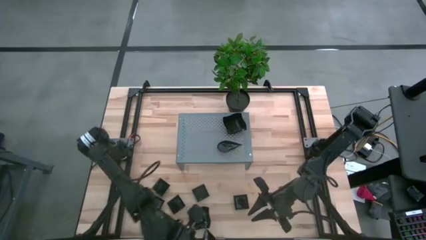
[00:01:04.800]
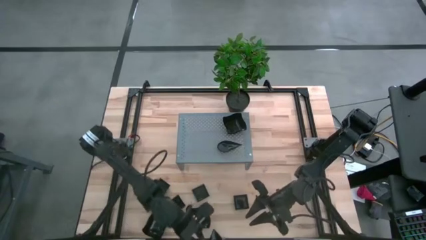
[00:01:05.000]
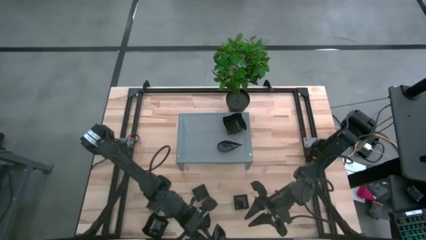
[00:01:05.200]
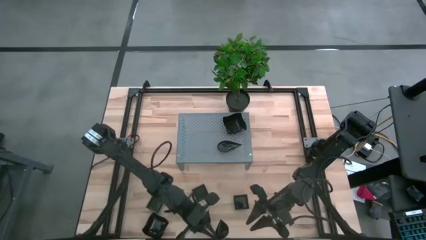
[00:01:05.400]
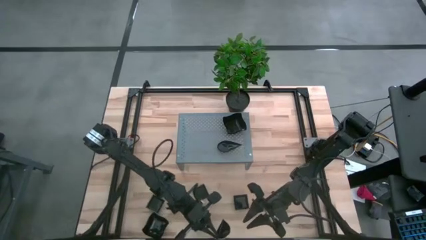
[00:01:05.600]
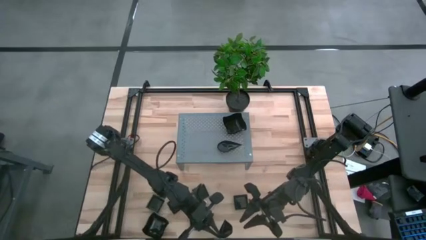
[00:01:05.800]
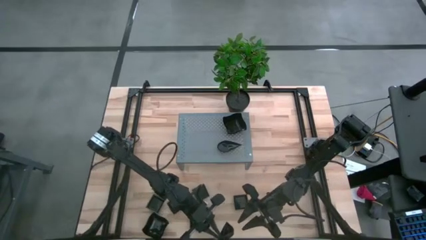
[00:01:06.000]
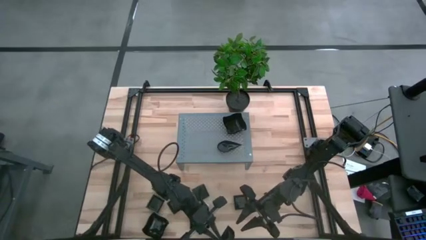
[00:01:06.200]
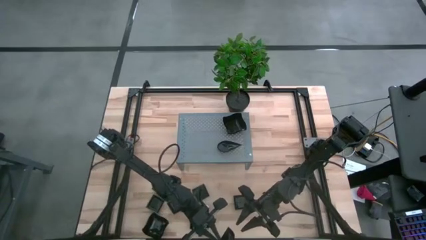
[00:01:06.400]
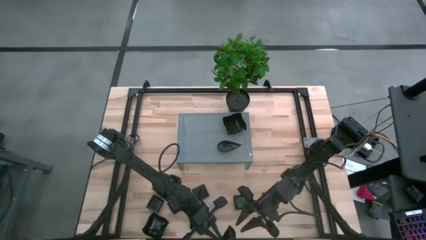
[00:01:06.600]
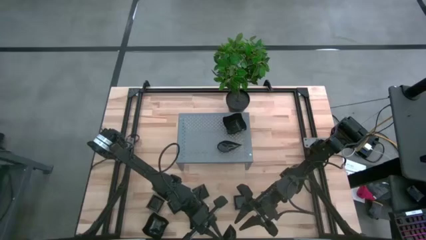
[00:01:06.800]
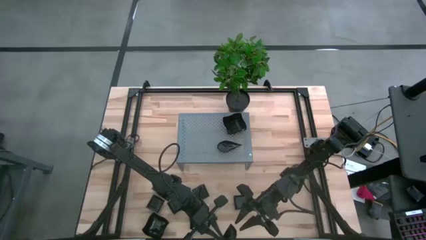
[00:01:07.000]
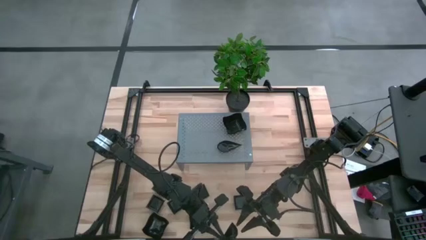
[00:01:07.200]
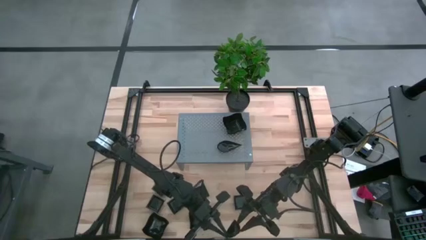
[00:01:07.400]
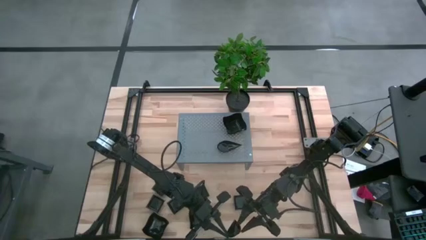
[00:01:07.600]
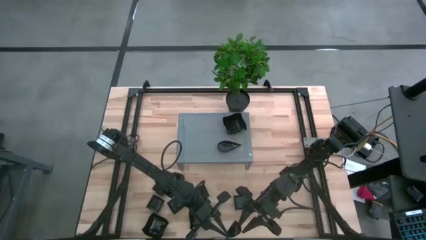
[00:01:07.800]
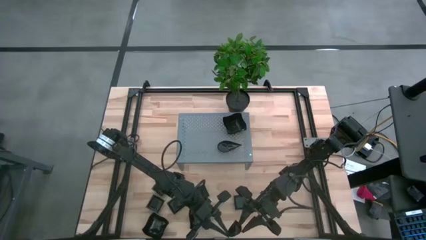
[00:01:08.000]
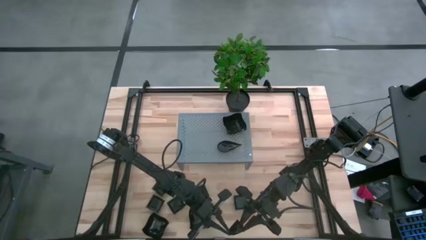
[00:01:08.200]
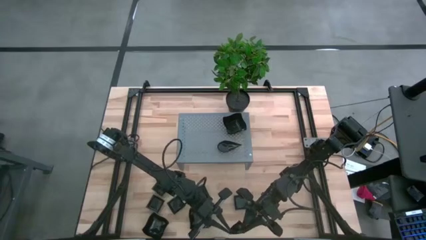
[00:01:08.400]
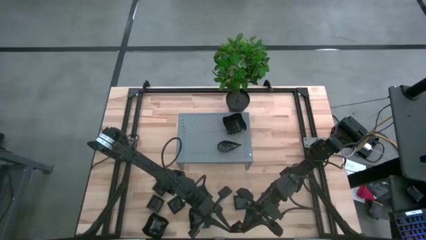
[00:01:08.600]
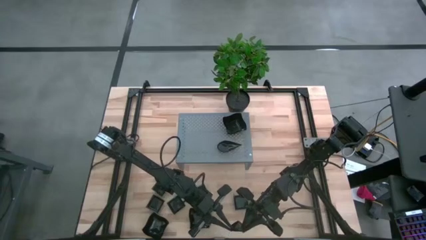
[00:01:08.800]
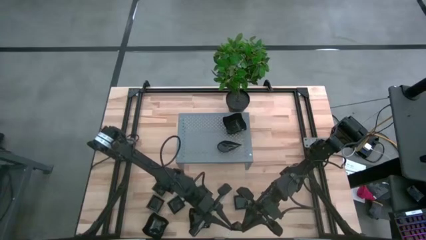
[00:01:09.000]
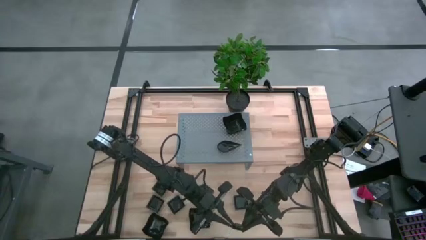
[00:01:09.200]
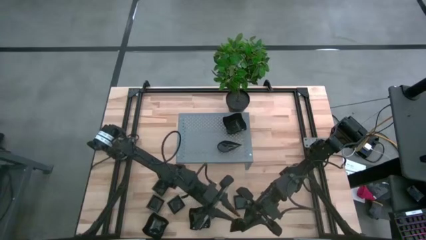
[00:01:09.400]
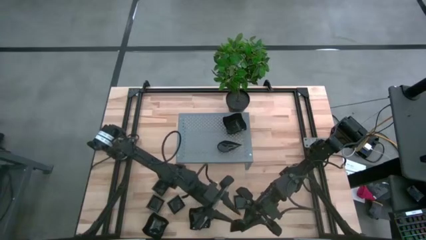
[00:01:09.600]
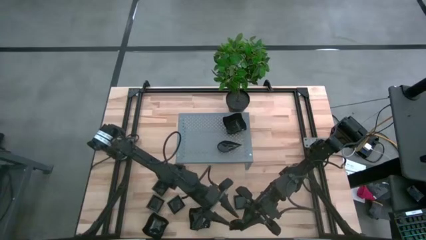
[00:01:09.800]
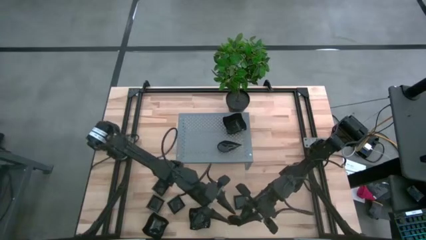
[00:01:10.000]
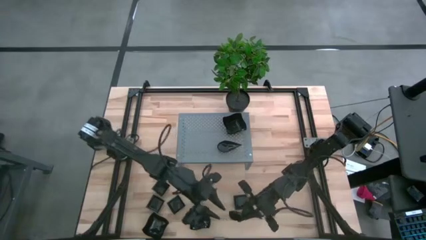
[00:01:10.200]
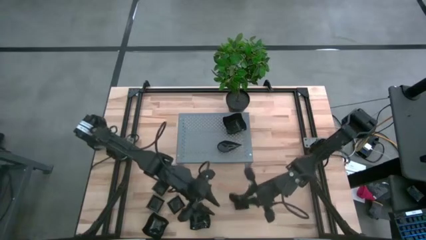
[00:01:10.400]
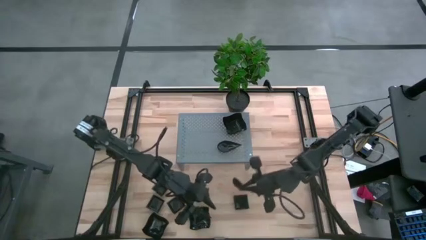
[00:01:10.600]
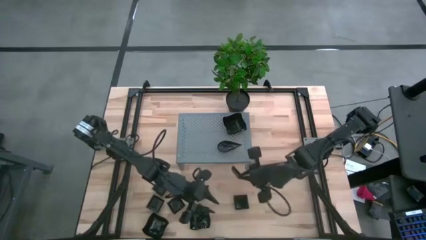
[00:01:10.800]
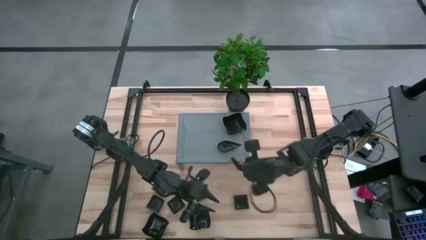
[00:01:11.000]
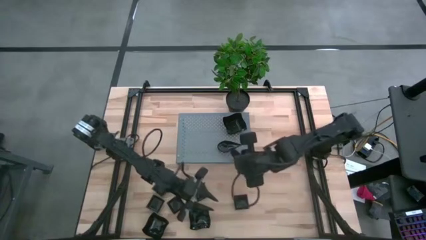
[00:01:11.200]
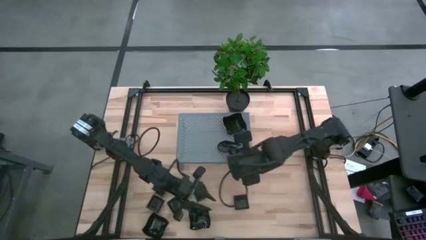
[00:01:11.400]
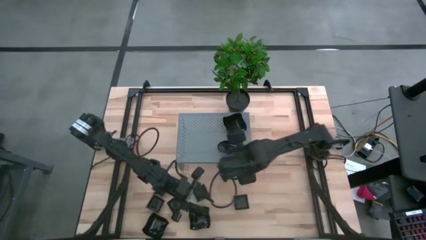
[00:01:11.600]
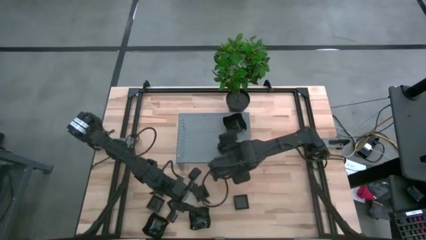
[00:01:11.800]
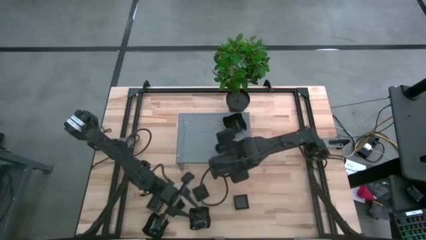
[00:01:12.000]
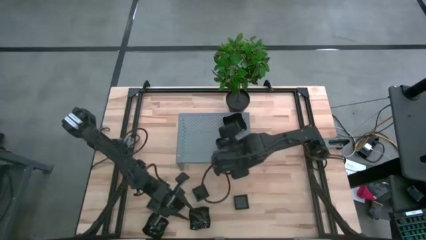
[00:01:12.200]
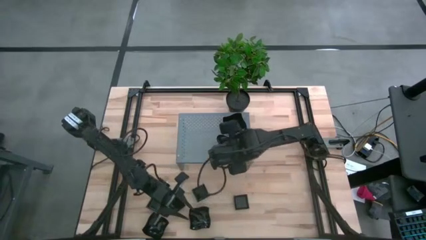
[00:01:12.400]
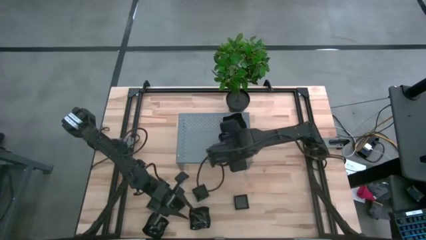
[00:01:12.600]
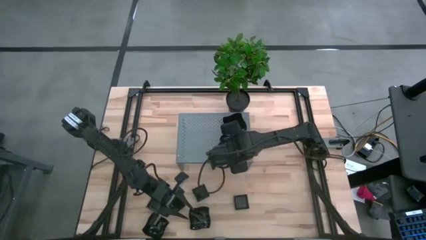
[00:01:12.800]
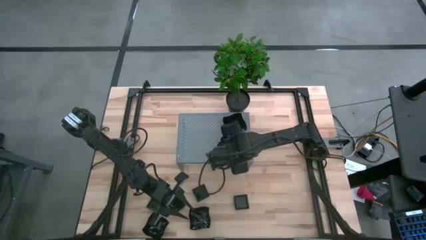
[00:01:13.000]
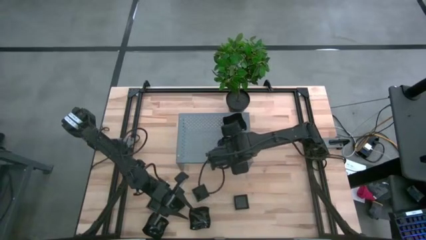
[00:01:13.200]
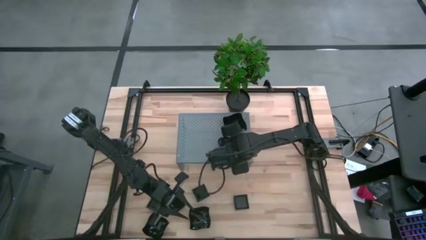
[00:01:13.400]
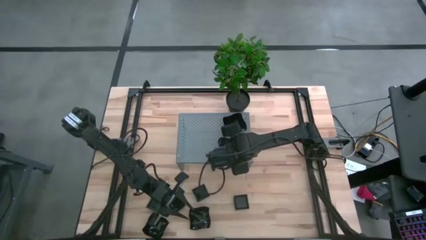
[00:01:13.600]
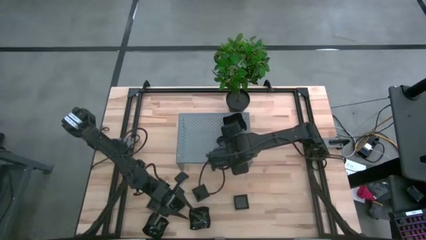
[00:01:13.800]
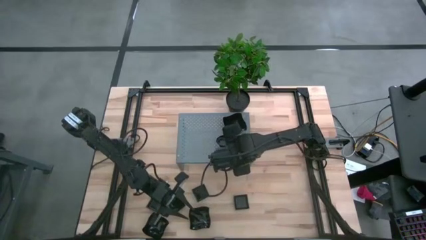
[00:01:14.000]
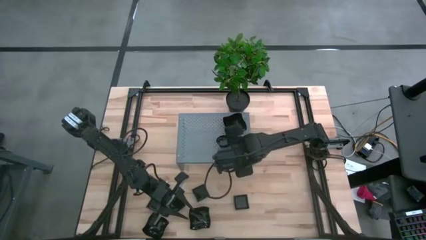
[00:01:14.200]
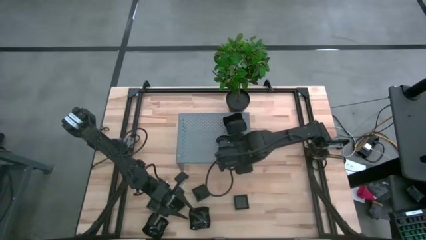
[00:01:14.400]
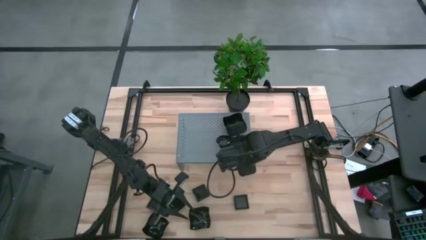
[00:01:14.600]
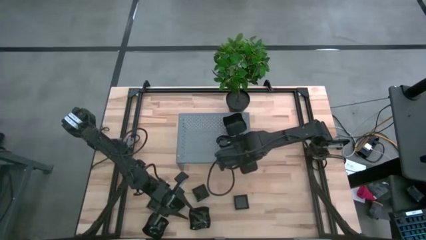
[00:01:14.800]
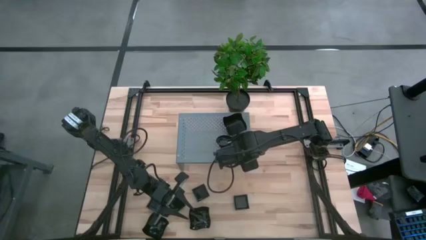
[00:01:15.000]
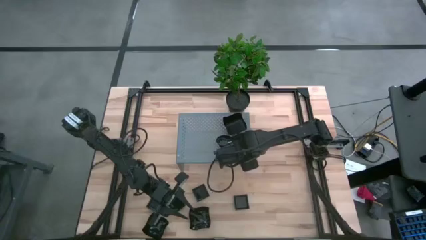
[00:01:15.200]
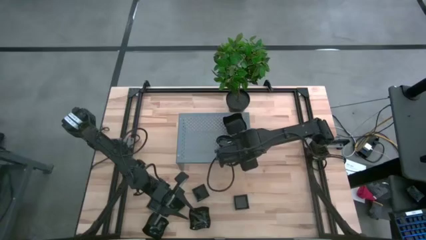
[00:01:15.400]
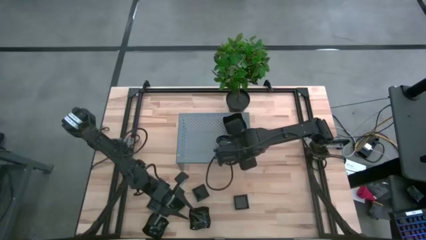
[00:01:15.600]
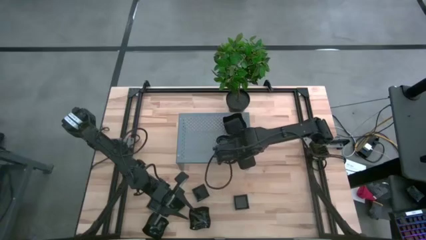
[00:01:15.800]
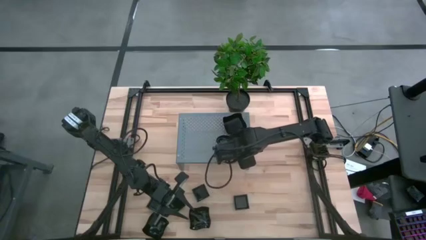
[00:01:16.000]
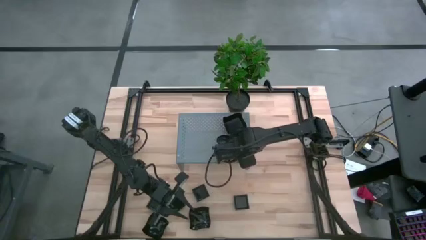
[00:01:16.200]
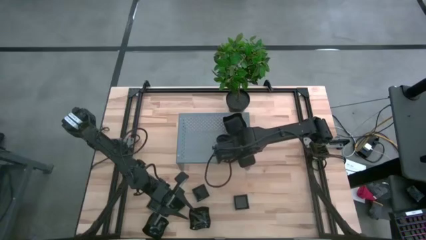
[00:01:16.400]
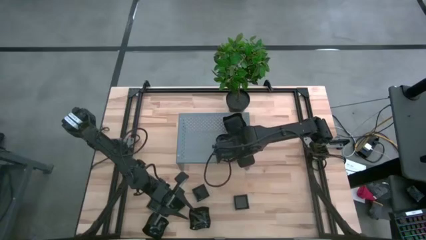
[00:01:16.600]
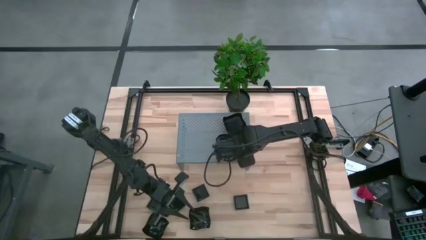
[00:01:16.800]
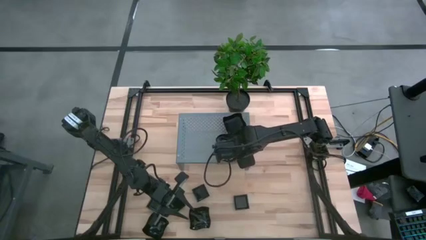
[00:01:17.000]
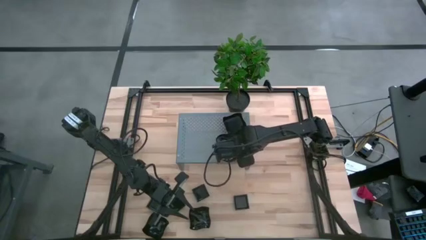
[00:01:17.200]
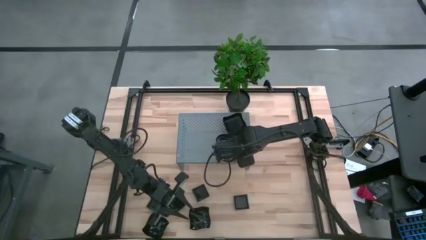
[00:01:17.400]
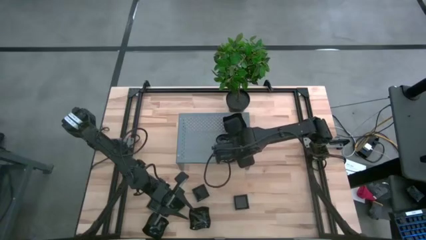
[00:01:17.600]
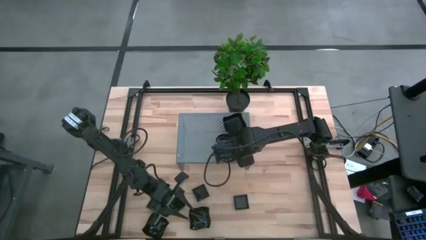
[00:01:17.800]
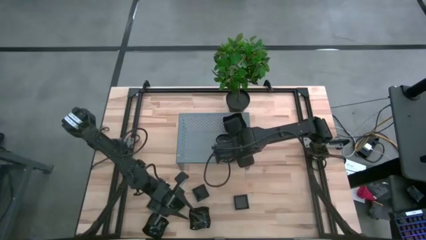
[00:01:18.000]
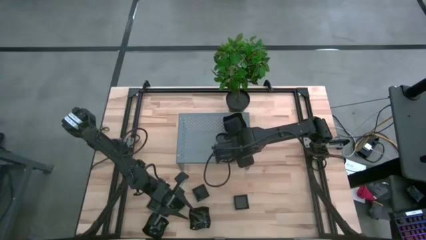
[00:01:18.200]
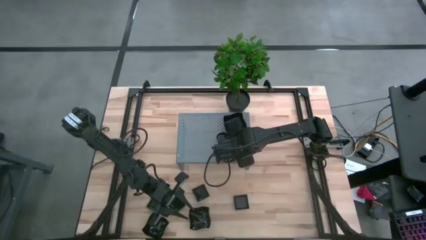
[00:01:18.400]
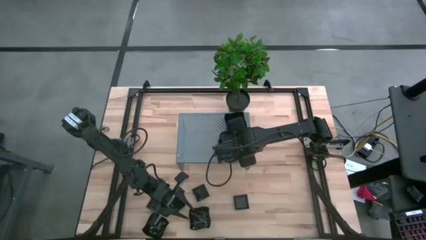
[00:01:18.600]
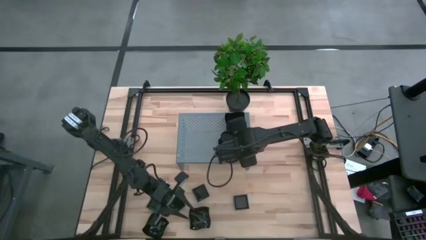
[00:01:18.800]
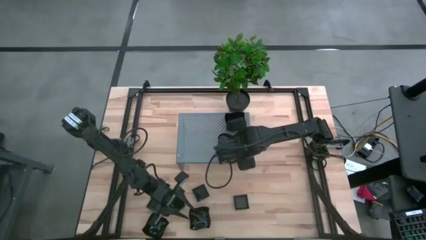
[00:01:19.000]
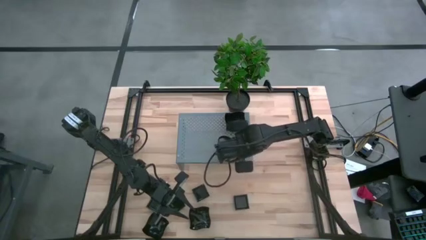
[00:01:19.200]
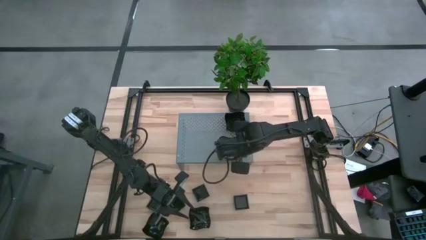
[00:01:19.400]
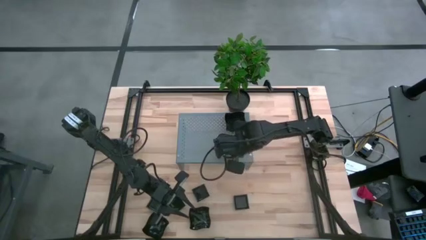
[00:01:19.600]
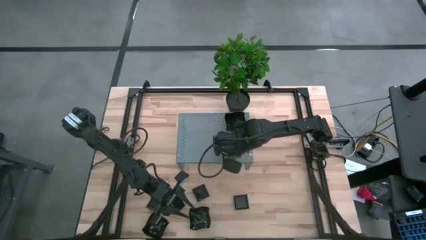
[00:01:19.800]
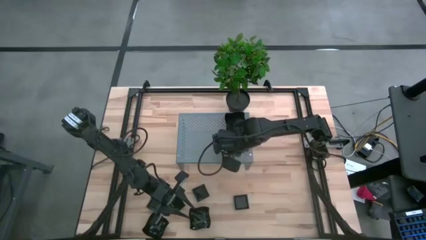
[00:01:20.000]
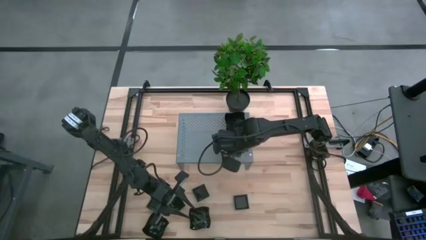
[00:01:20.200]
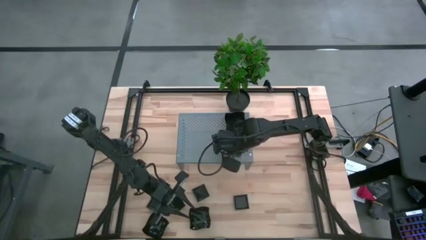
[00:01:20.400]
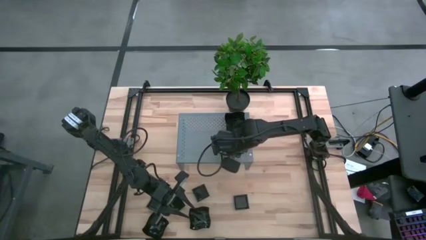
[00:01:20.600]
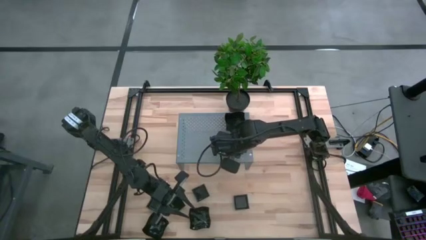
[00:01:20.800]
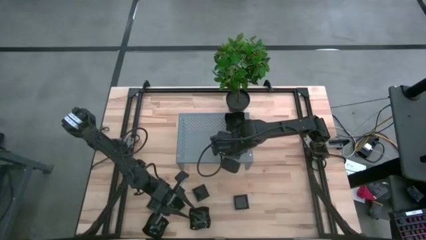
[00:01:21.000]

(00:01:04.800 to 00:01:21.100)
Task: Pick & Place Mini shaped plates
Stack the black drop-shaped plate on the black drop-shaped plates on the shelf
